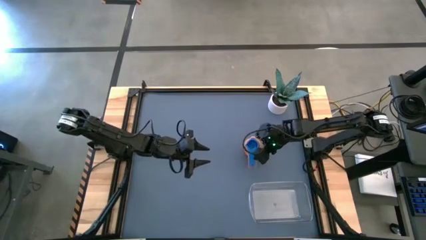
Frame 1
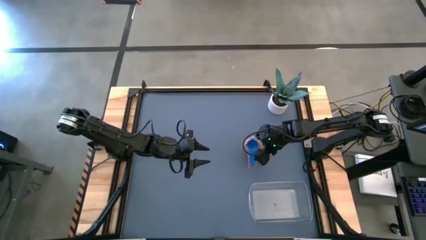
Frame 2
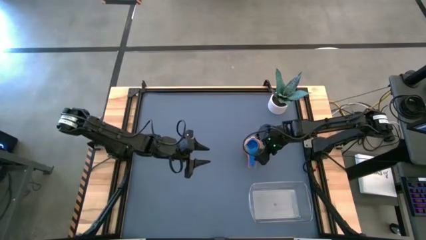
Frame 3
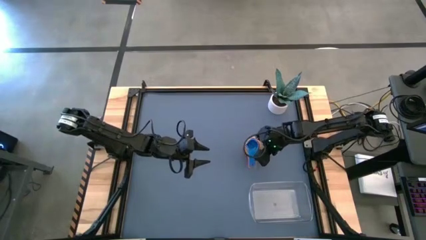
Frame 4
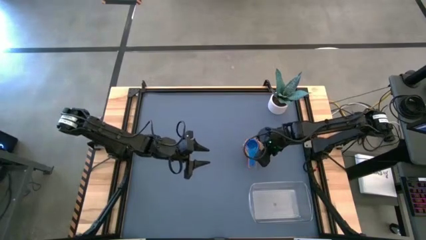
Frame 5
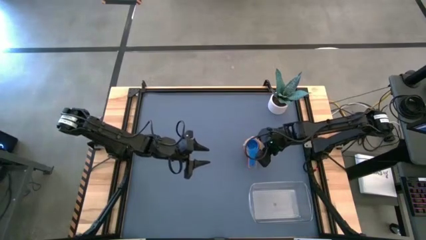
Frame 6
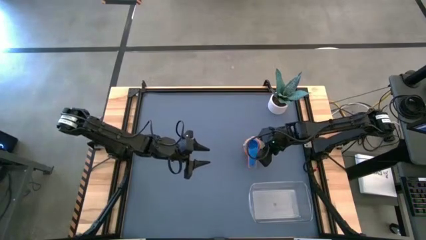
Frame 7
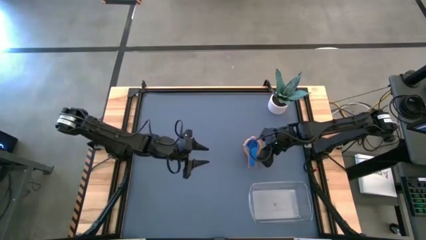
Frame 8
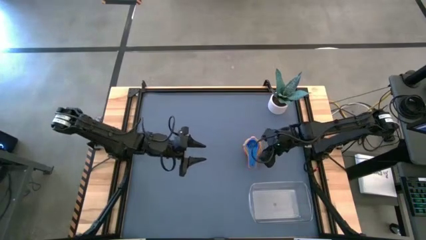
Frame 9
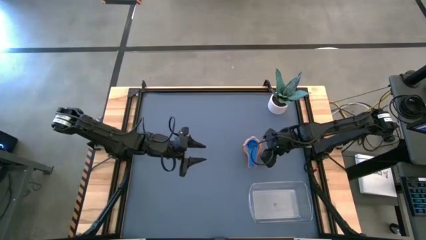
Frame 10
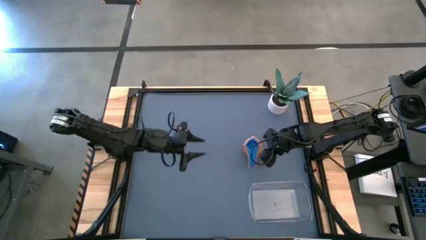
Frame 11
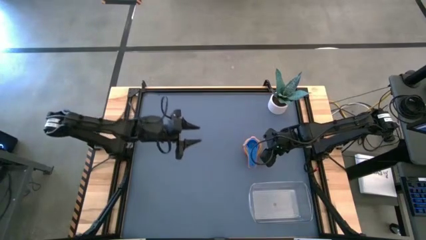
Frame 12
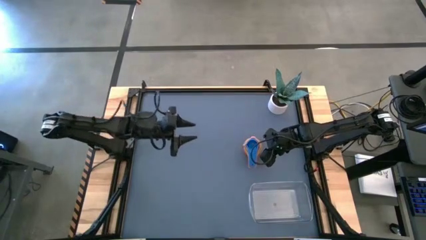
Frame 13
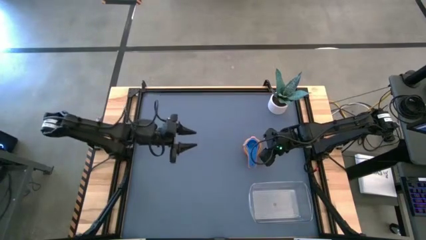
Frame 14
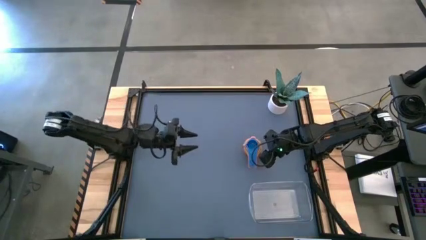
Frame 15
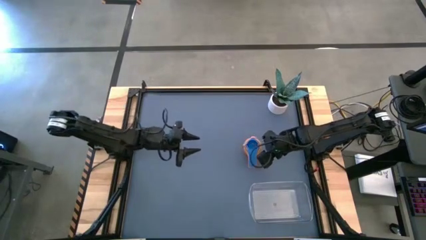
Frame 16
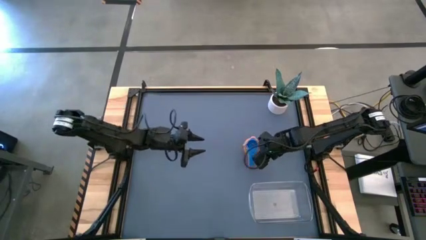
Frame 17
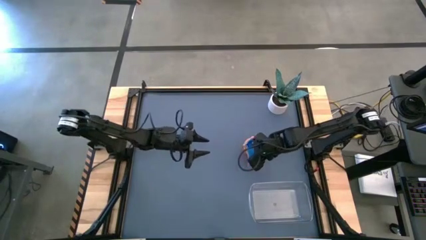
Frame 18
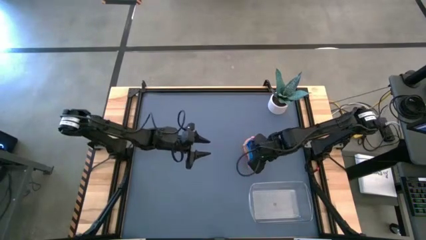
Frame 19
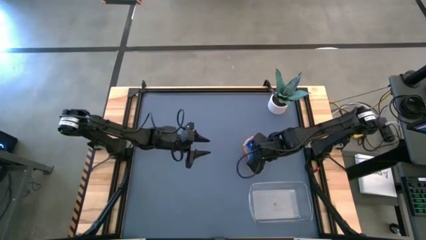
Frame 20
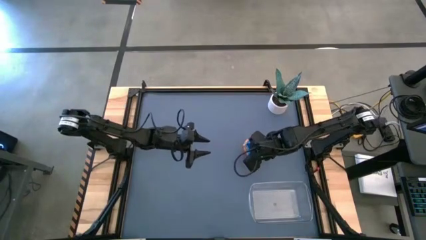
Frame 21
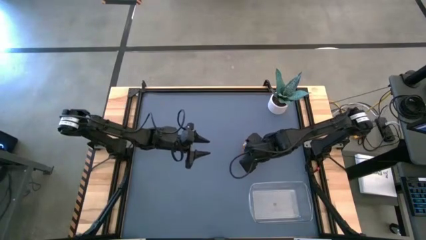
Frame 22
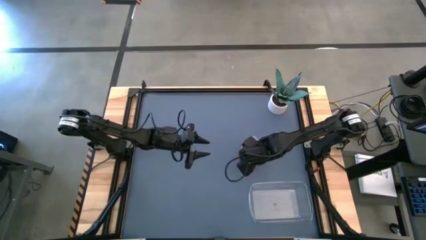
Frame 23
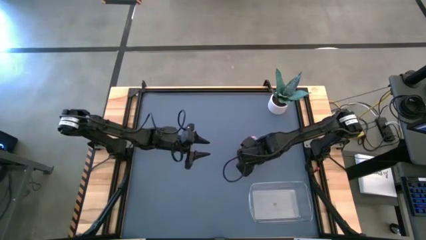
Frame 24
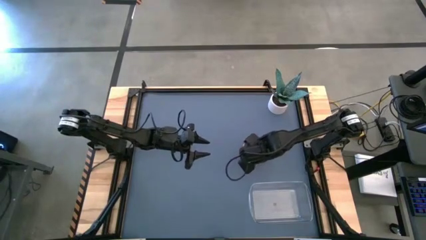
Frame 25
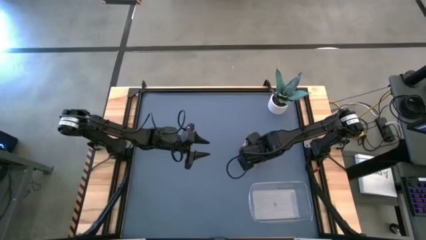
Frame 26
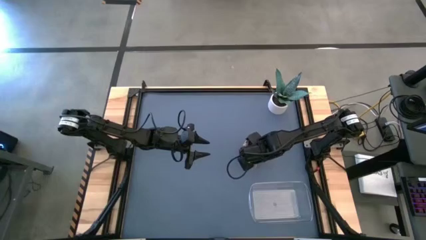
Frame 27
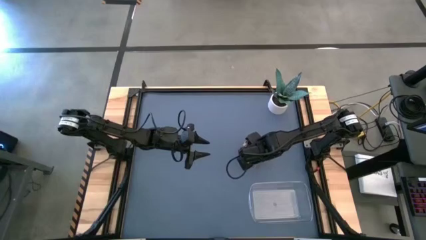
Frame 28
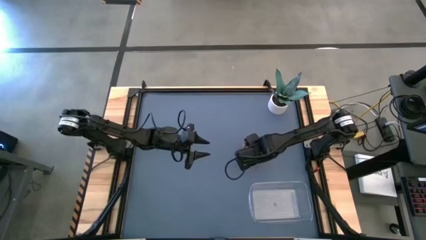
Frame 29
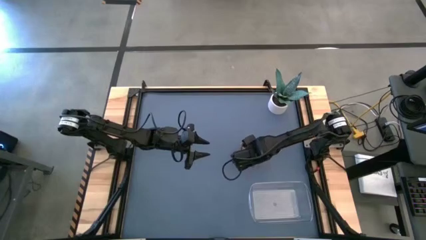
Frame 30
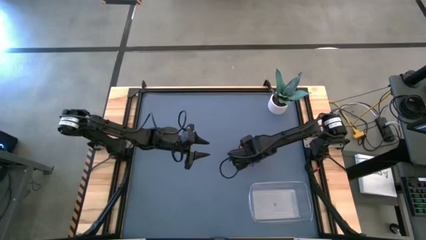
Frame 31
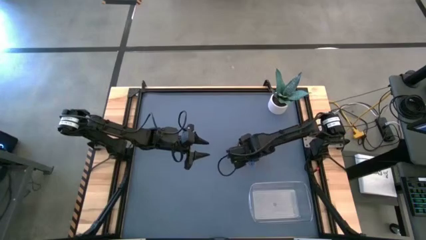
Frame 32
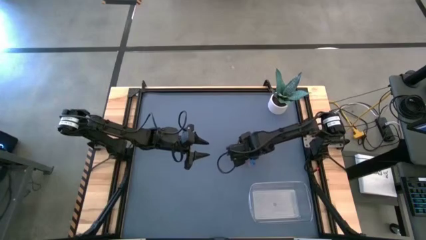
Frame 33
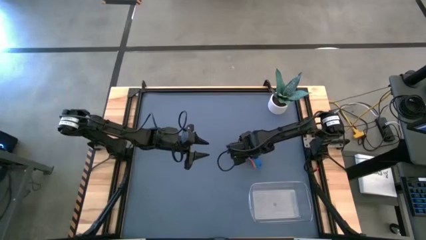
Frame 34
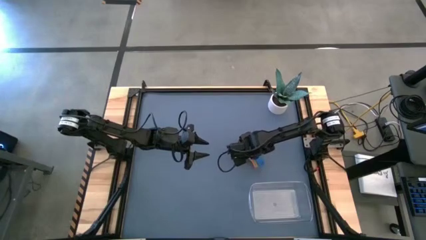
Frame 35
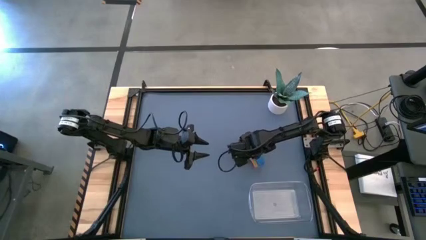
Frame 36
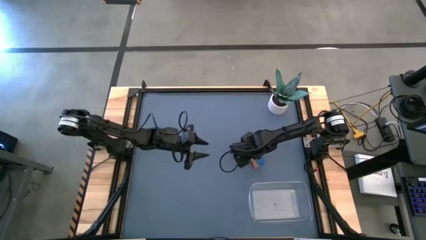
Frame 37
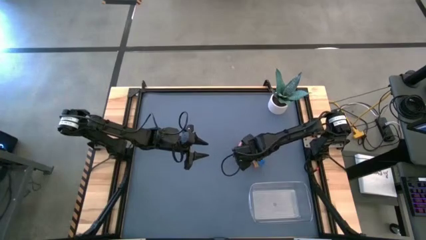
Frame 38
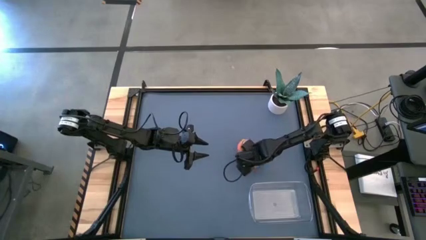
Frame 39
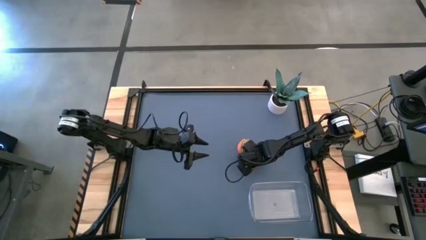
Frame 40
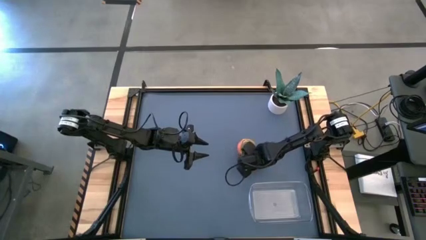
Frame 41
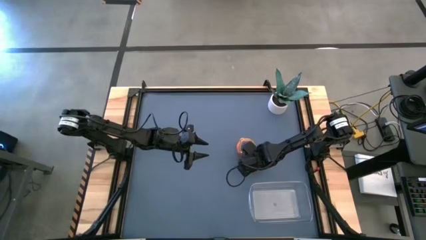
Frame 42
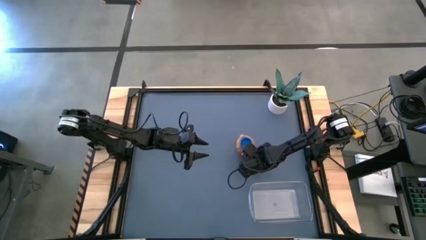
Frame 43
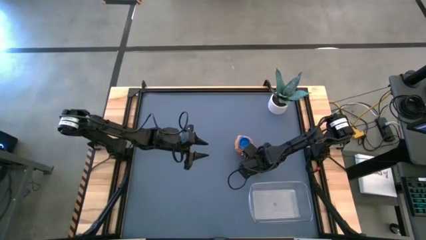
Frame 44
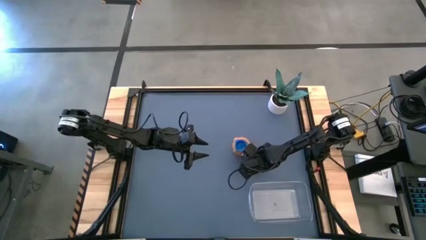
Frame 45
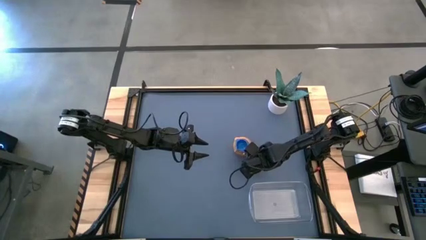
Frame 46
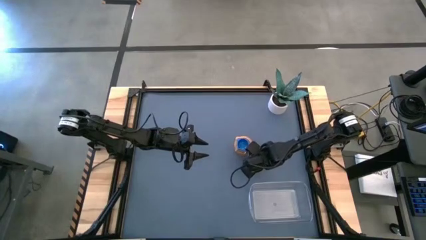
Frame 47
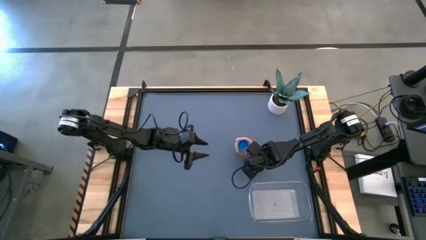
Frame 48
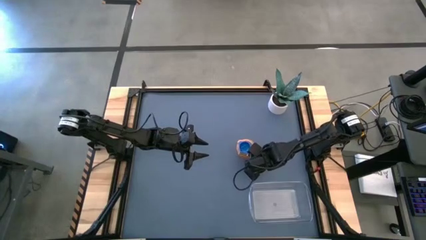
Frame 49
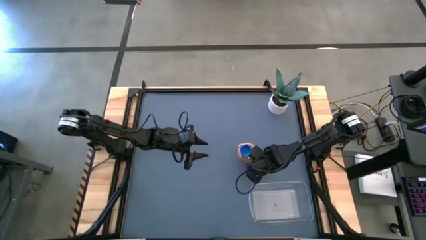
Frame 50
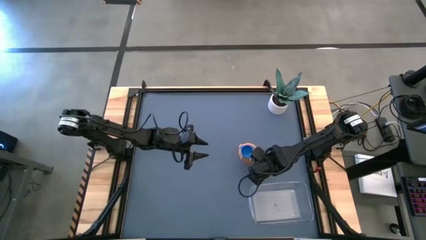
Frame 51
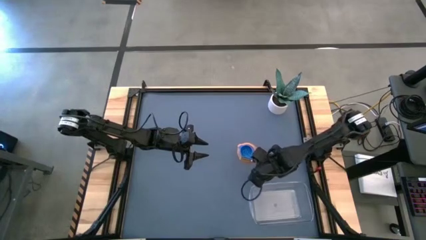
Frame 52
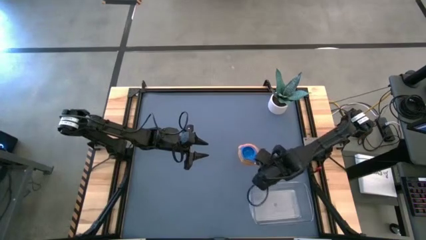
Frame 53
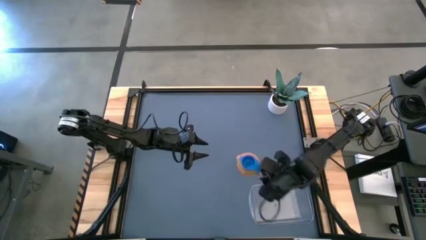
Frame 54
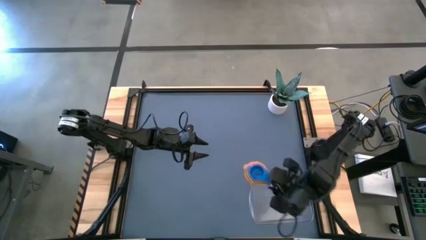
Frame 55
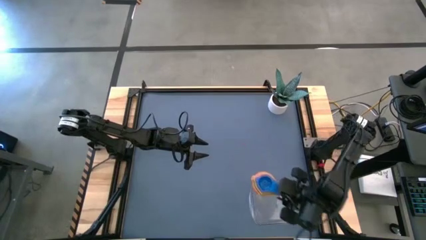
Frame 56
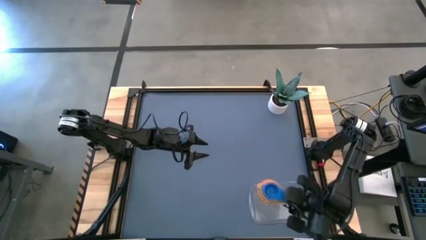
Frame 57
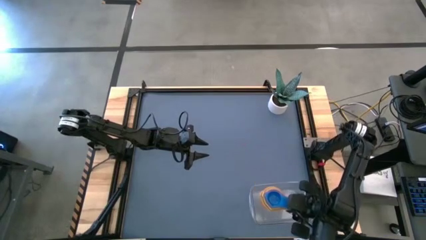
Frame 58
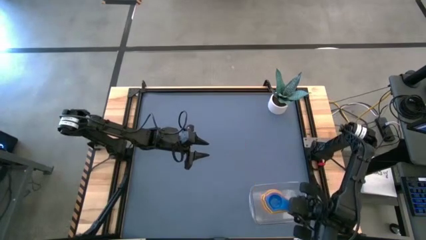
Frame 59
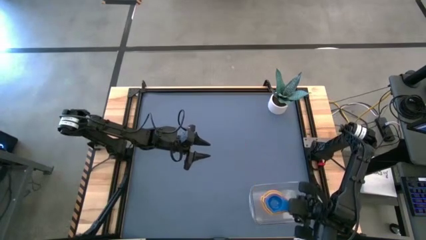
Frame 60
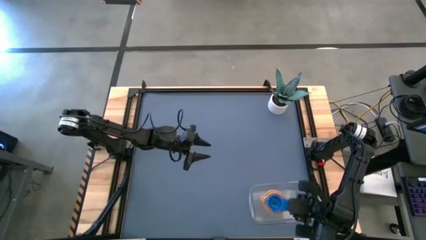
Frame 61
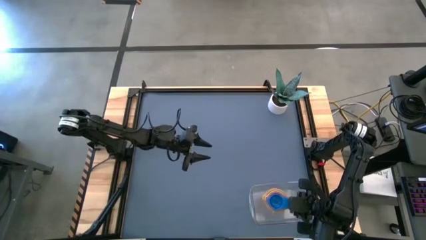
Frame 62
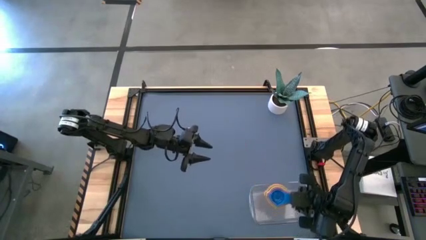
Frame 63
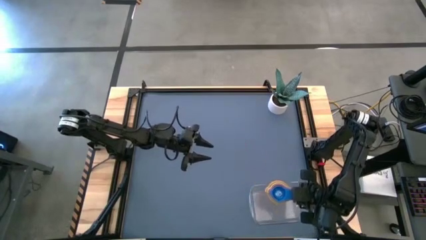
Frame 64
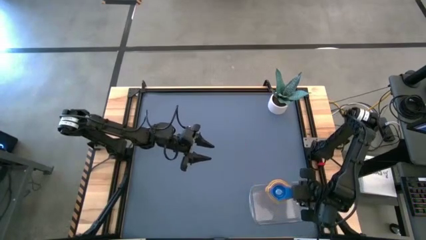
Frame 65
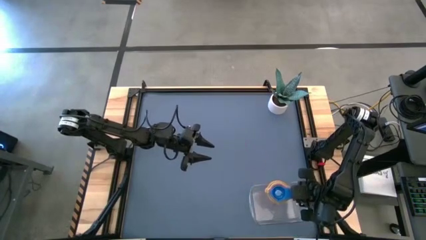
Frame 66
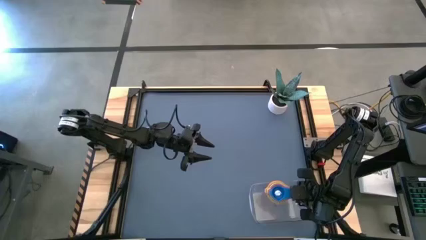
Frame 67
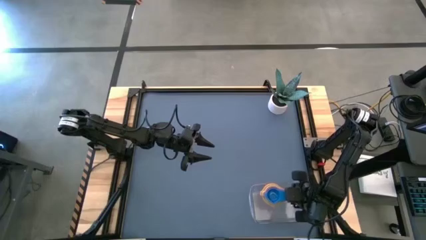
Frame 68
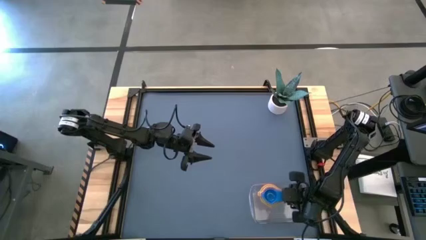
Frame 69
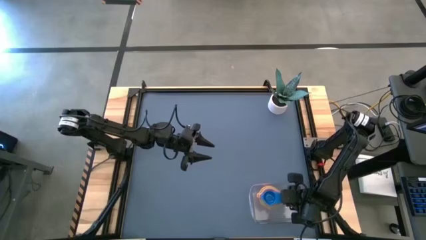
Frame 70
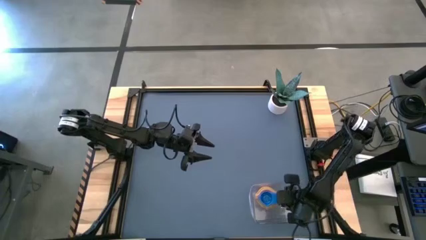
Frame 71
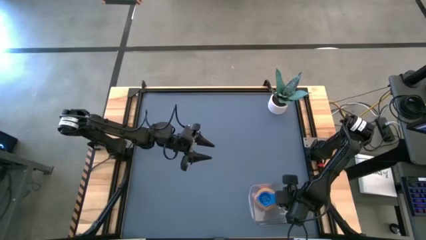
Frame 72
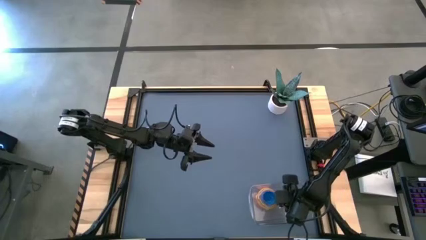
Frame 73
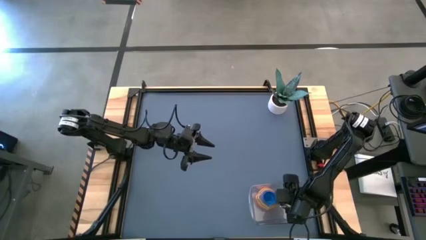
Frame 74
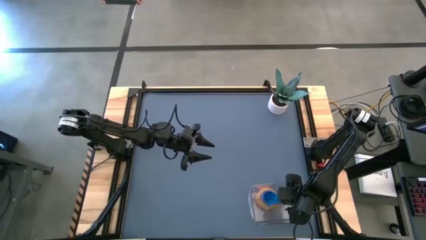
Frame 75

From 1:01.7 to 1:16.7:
Task: Nest measuring cups in basket
Put the stacked measuring cups into the bin
